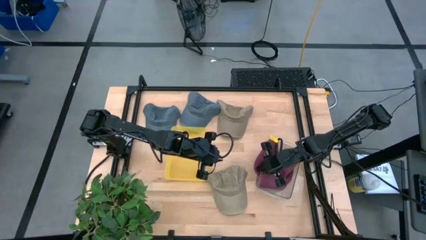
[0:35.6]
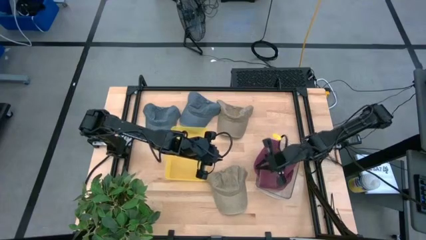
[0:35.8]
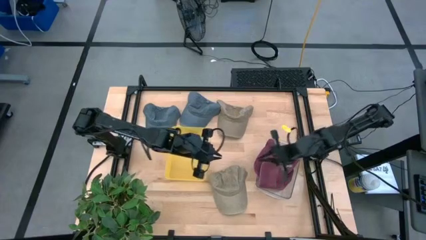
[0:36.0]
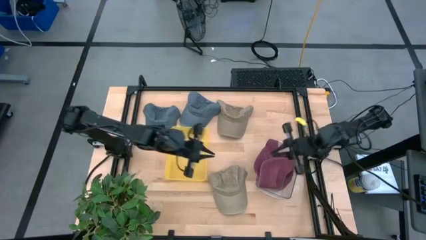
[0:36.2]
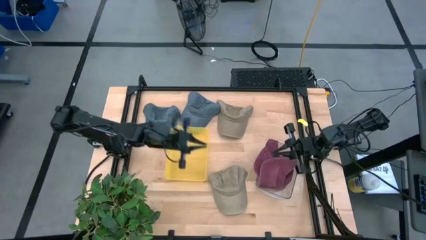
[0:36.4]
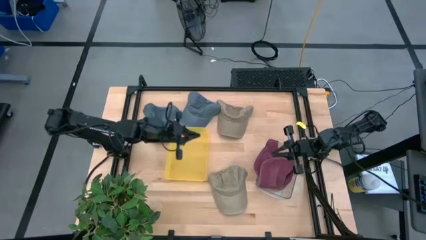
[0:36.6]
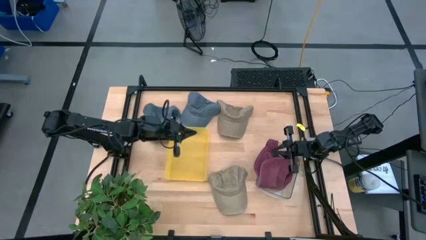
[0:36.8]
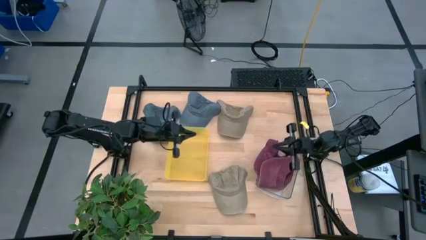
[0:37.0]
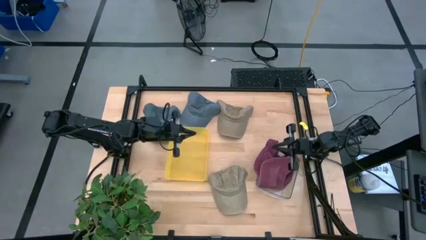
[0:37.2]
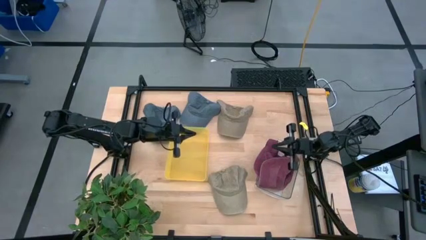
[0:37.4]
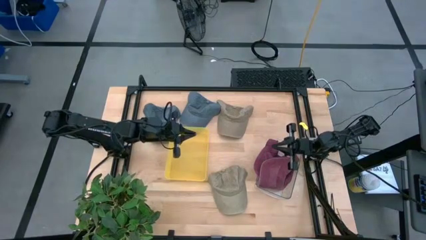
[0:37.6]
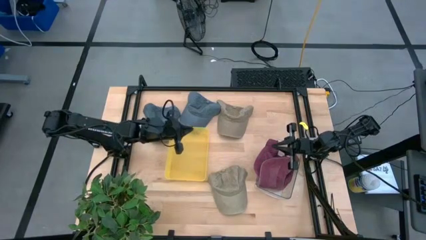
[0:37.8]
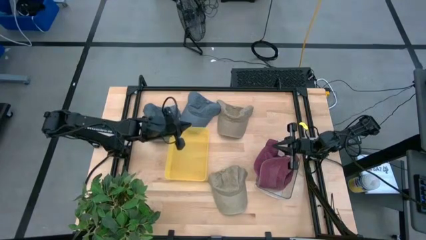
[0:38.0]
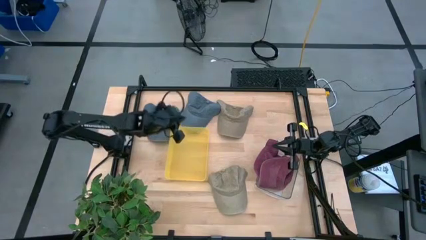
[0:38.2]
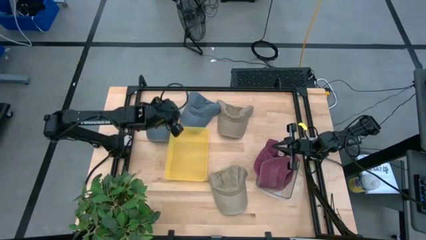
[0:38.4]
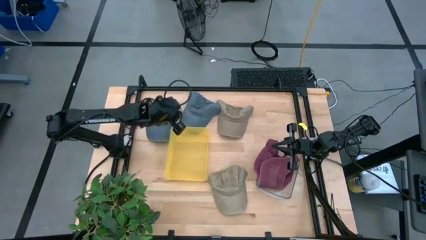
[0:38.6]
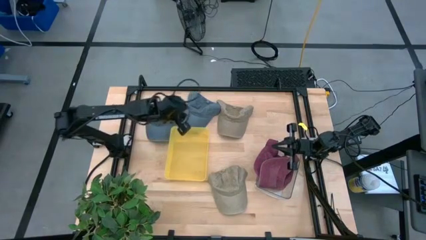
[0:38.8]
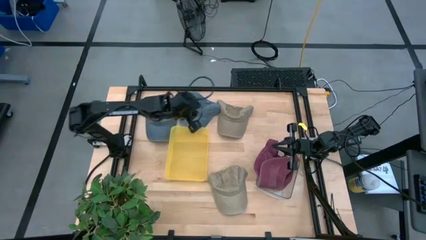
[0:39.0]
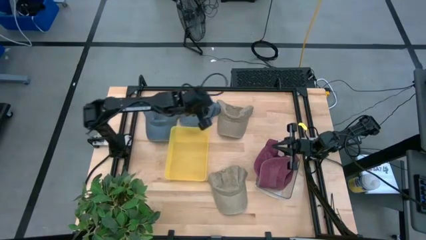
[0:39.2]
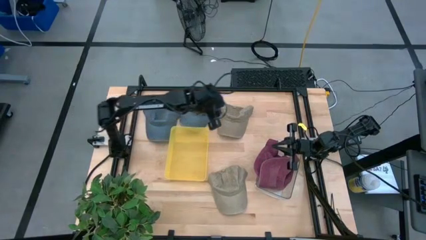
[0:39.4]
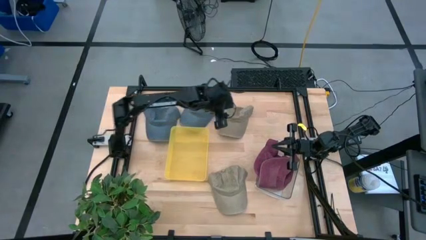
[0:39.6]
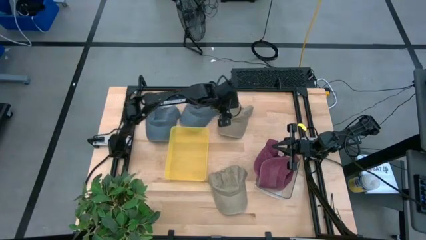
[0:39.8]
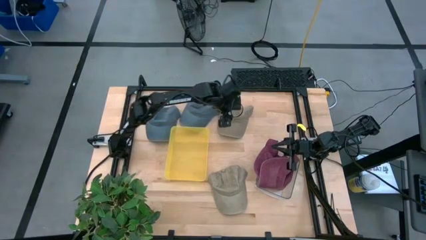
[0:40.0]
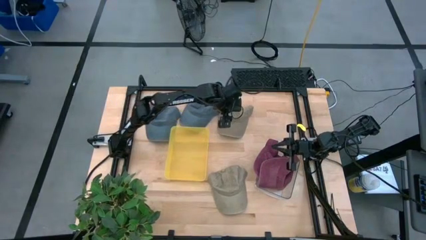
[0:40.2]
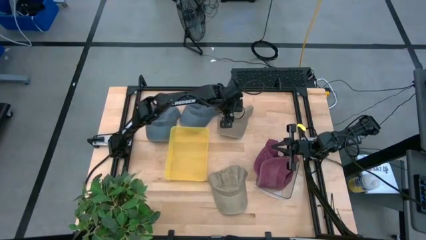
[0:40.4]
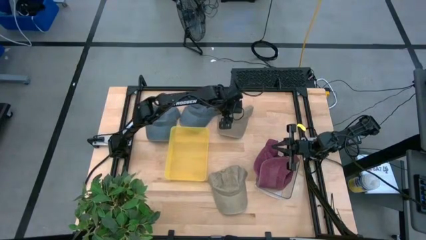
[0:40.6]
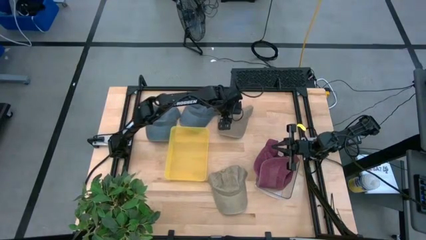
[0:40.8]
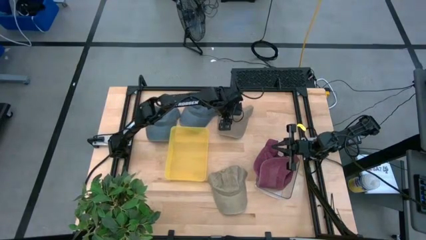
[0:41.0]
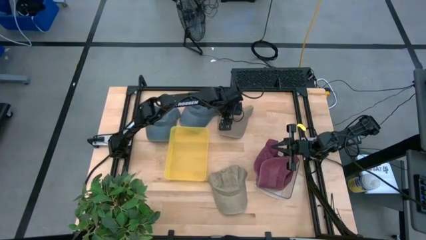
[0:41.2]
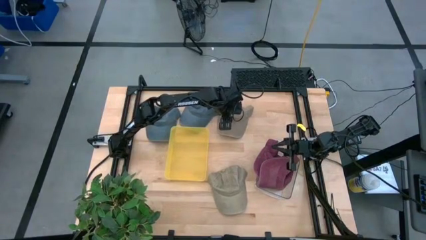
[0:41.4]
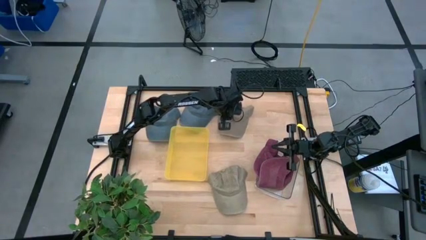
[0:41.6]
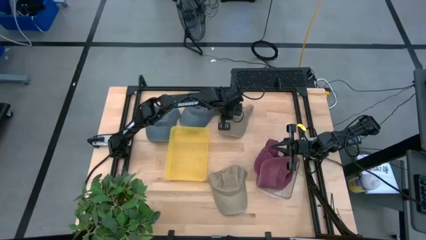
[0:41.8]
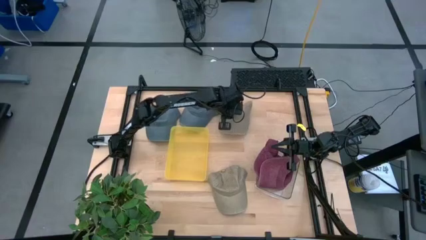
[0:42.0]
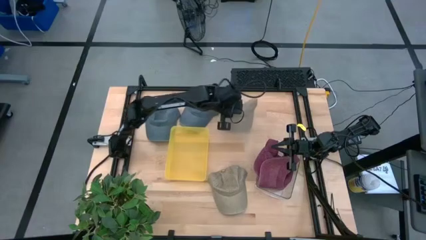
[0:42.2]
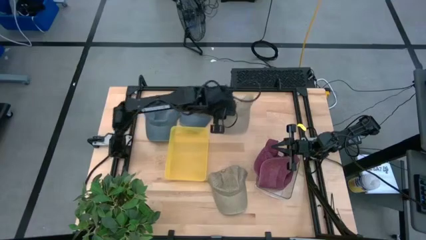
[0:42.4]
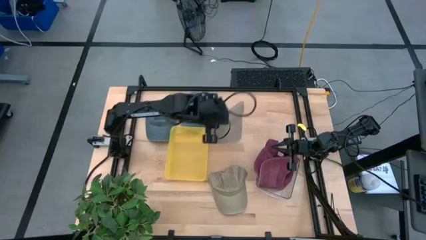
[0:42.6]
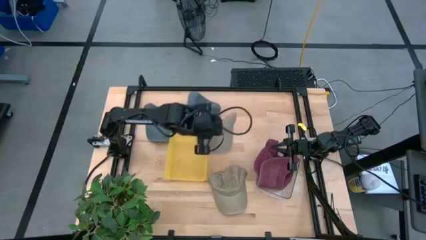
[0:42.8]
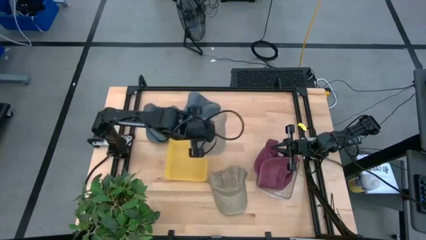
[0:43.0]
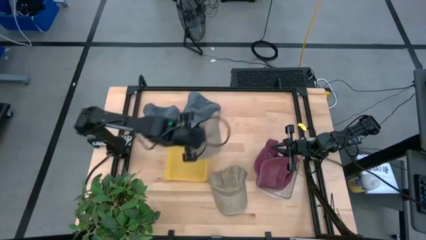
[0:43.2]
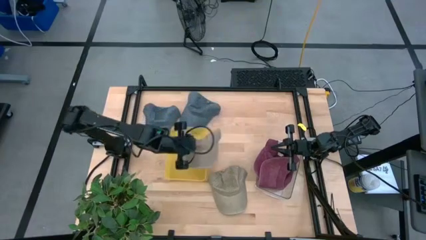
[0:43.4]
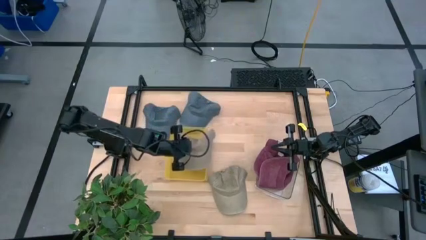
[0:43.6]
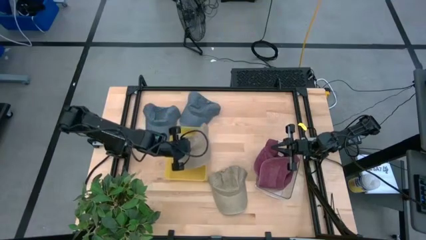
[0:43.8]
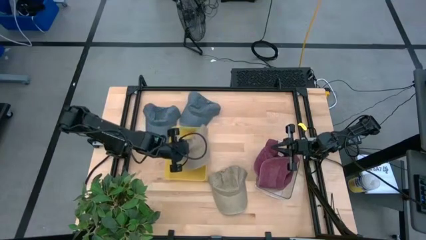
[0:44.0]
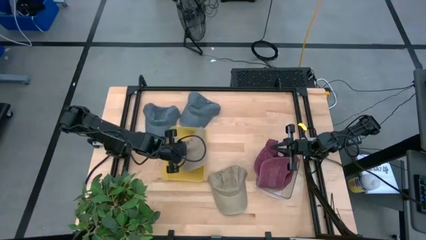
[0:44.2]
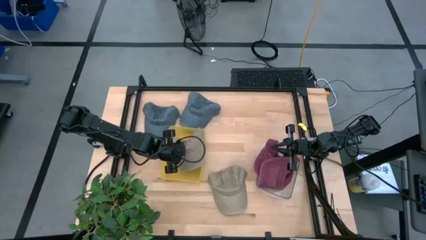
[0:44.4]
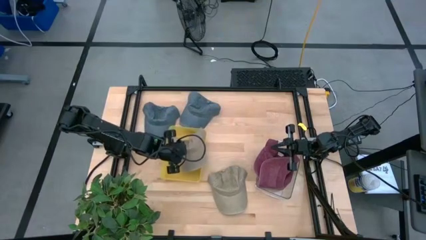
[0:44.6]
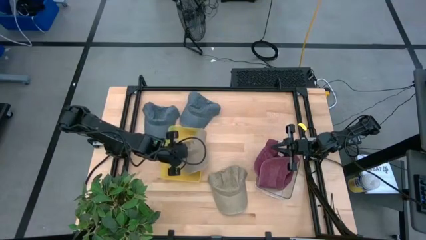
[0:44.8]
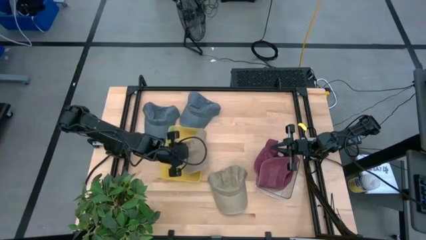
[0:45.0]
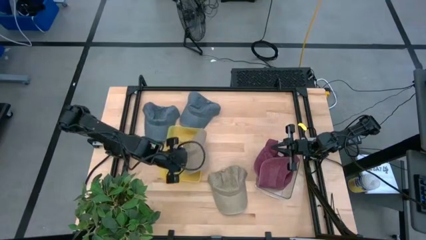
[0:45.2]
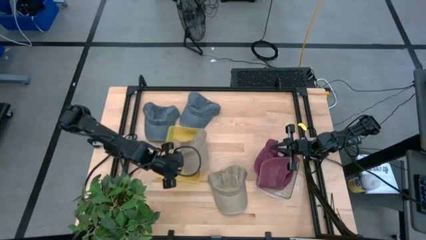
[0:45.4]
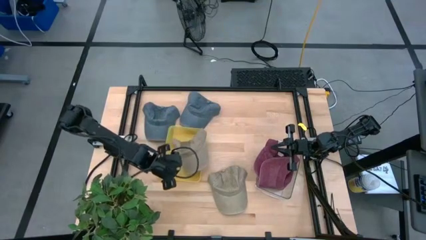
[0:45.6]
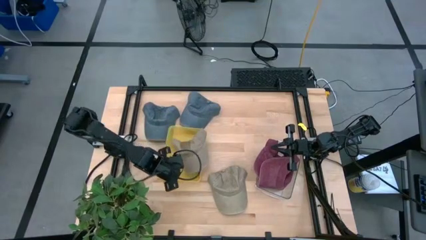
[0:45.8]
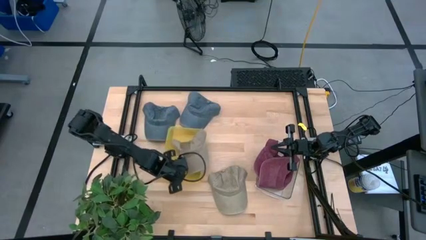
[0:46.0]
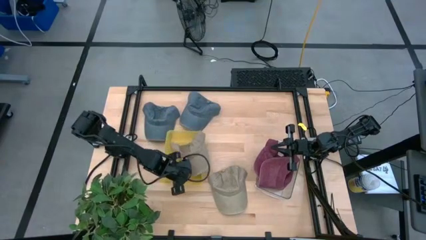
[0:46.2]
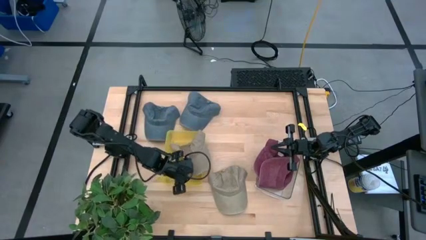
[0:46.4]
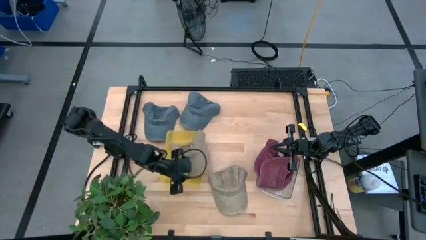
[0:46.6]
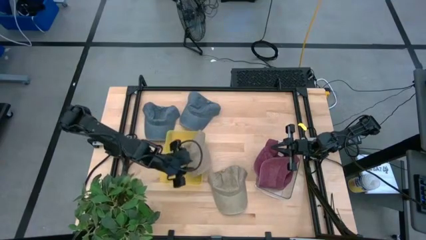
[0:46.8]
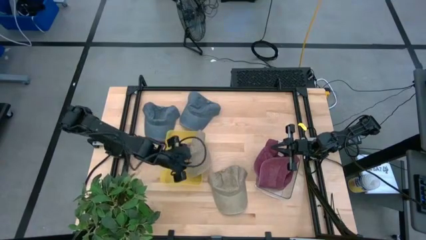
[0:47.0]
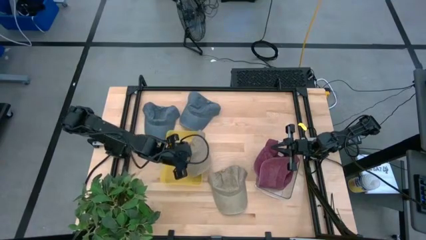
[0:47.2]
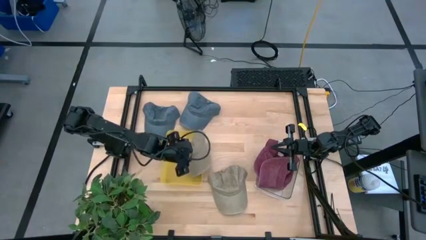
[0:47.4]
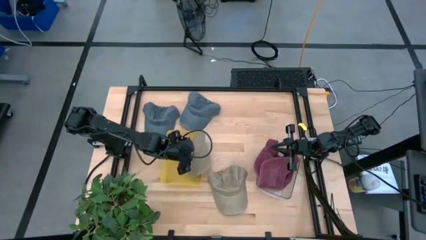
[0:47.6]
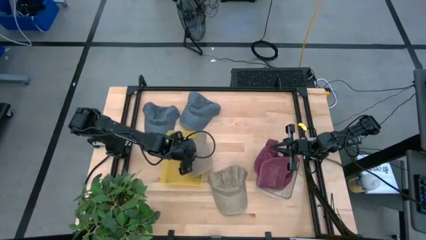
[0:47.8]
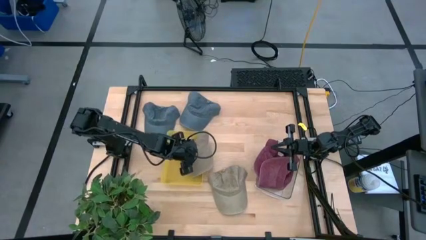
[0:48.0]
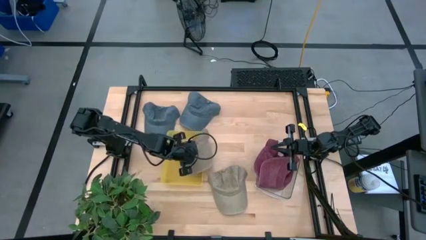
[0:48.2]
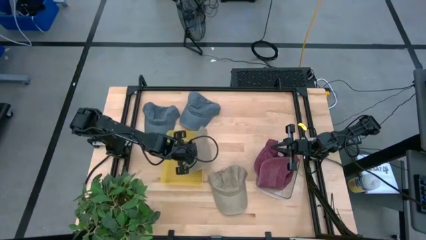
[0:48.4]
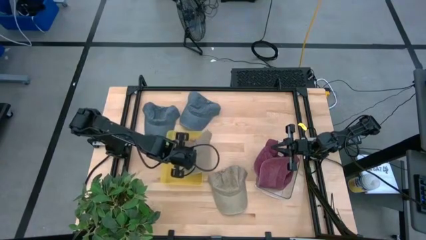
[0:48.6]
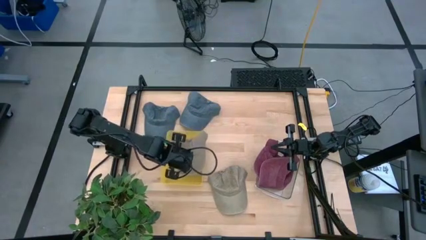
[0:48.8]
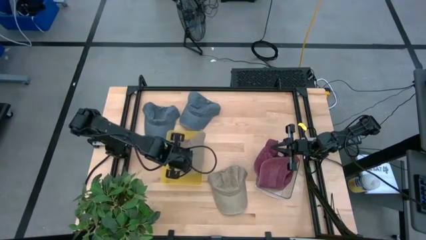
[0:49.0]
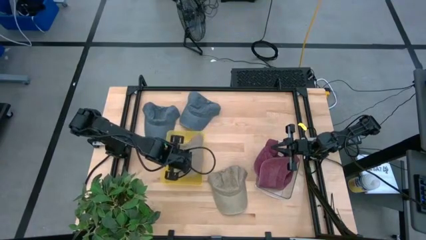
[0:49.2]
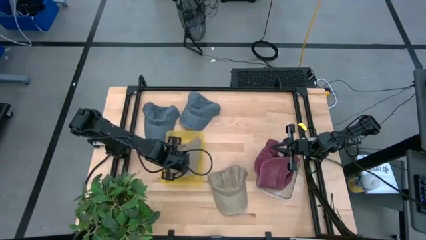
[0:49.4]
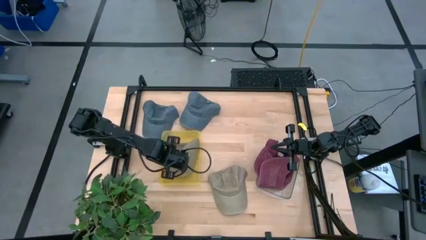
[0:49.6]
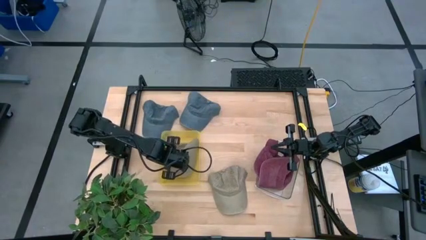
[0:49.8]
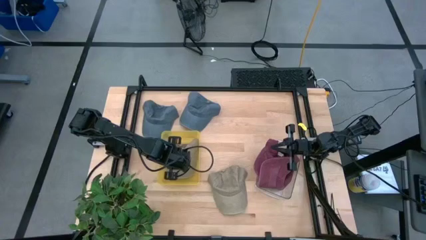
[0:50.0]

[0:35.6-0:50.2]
Task: Pick & Place hat
Put the top brown cap into the yellow bin

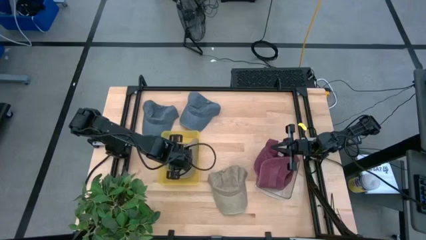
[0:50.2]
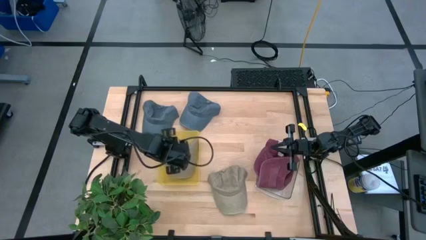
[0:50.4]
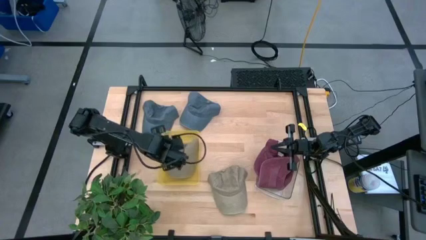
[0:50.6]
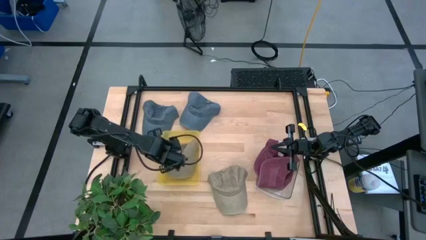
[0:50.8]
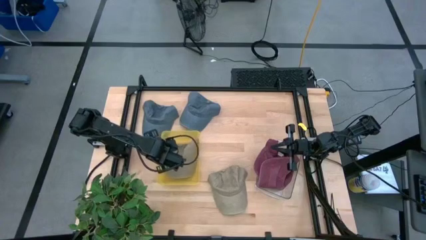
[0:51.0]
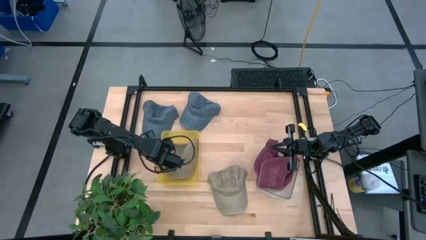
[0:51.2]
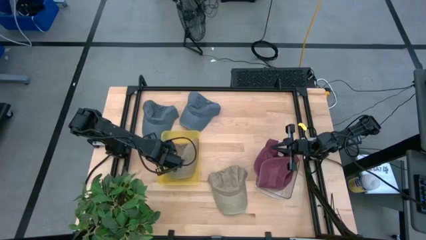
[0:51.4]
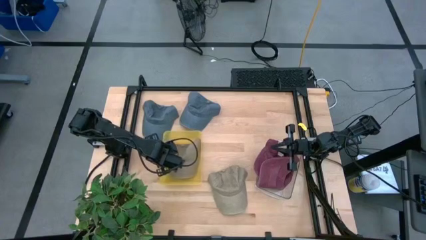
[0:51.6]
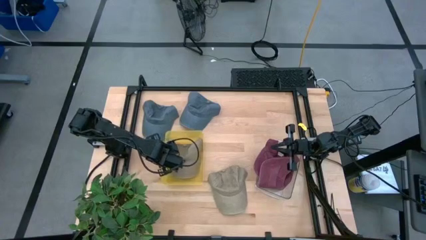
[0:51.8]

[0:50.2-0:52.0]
Adjust the yellow bin

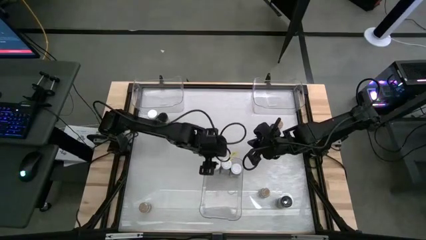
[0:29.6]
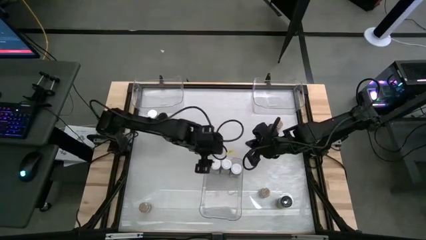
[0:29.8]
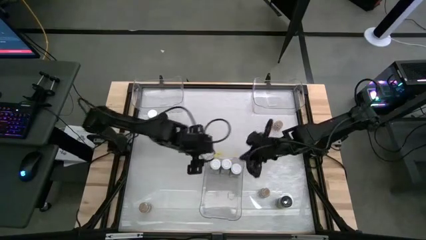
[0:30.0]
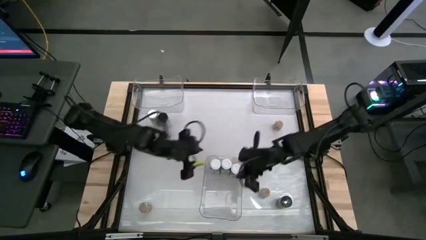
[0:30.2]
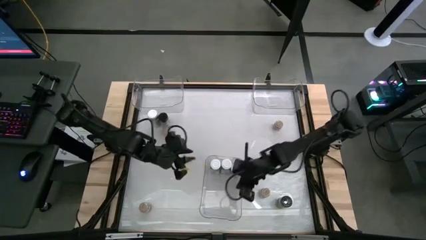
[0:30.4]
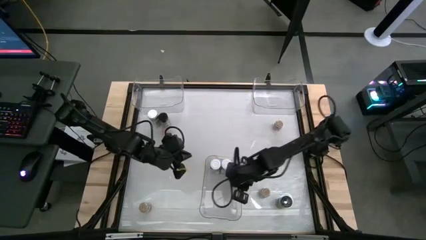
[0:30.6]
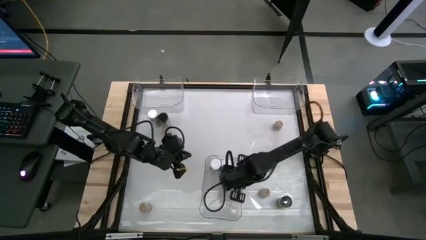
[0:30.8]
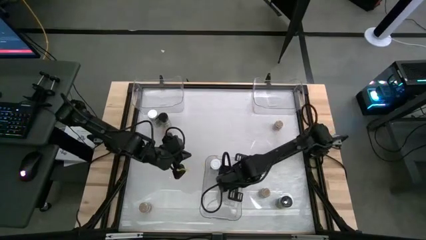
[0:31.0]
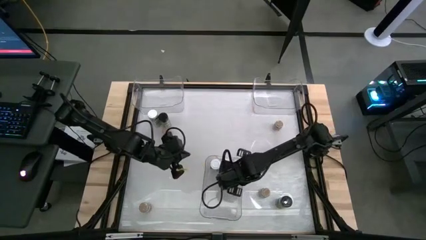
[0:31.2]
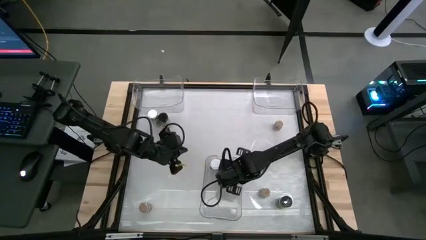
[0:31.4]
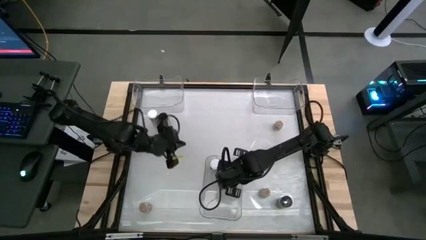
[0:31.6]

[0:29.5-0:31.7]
Task: Sort spices by type
Adjust the white seasoning bottle
